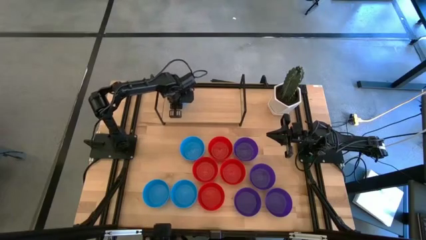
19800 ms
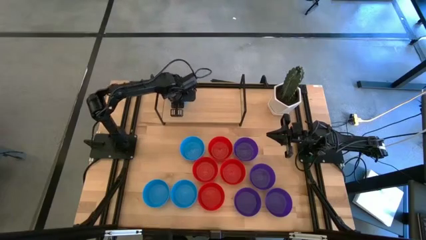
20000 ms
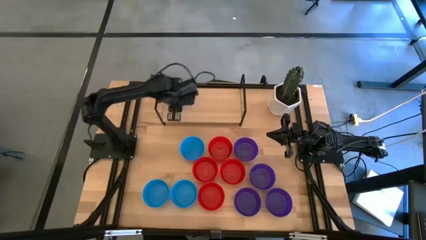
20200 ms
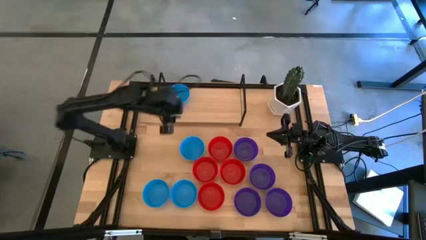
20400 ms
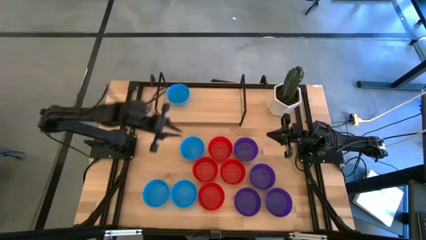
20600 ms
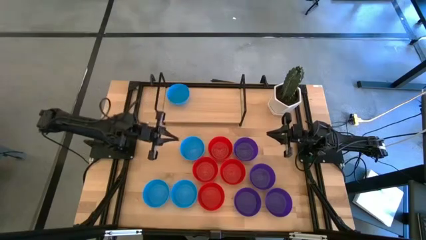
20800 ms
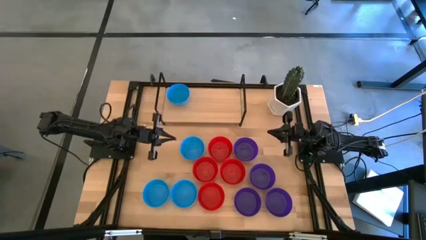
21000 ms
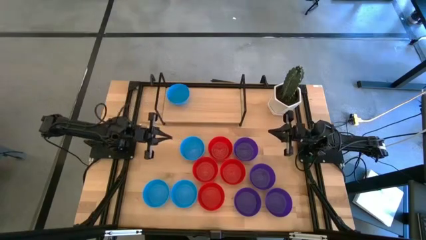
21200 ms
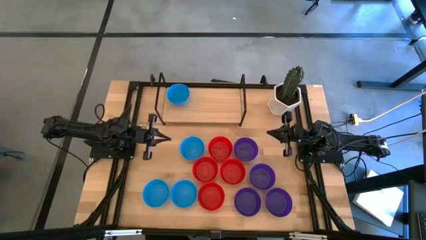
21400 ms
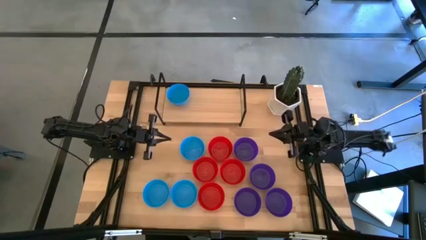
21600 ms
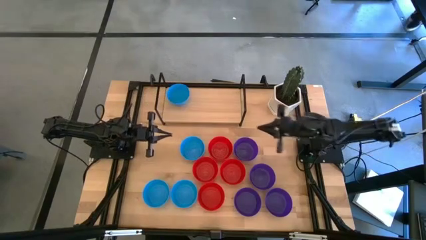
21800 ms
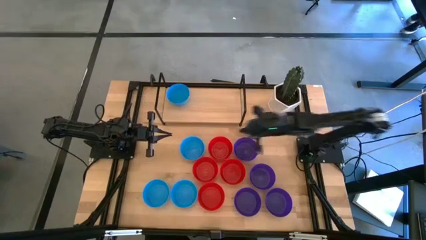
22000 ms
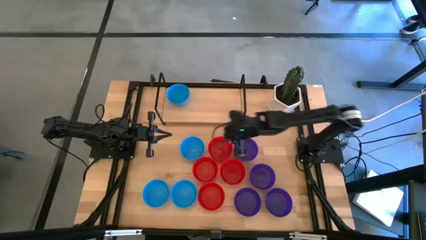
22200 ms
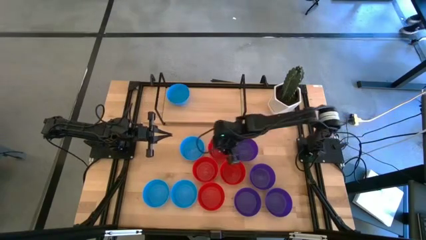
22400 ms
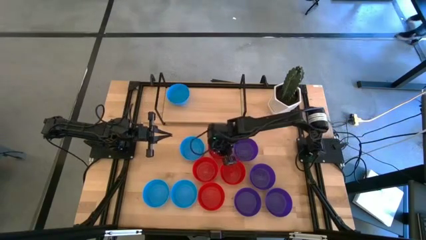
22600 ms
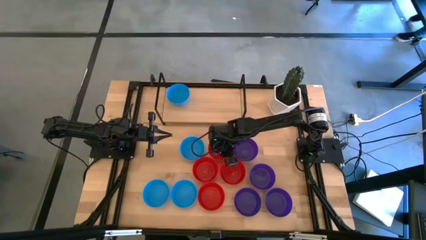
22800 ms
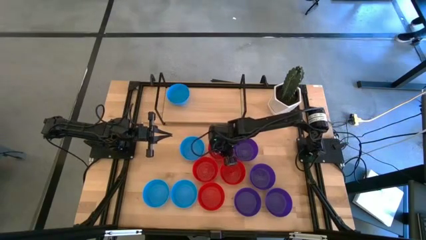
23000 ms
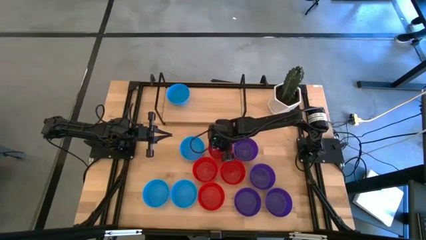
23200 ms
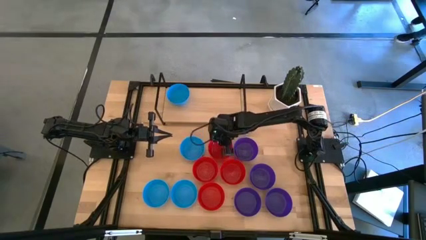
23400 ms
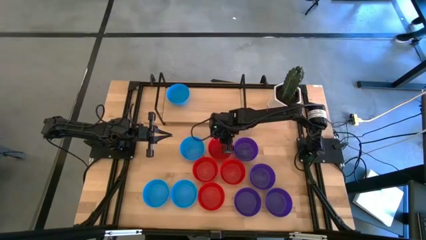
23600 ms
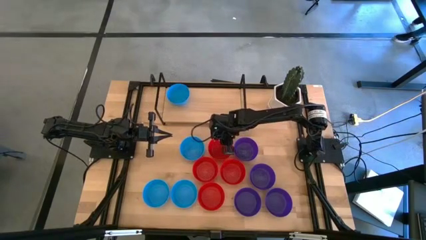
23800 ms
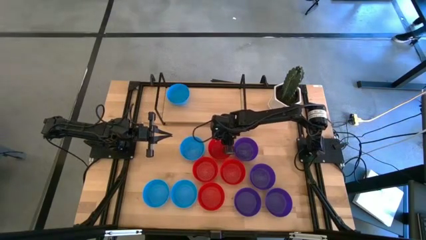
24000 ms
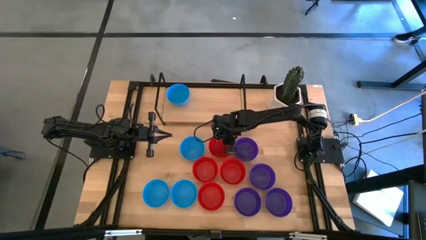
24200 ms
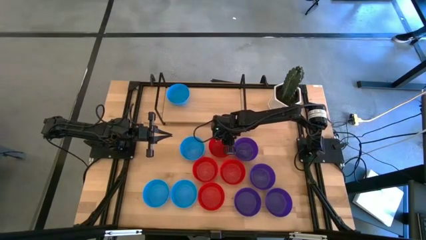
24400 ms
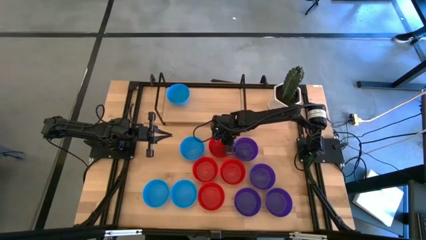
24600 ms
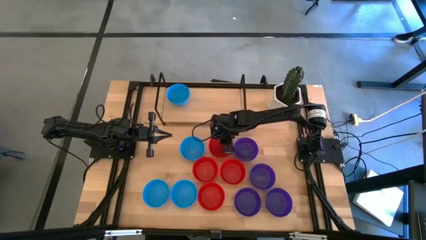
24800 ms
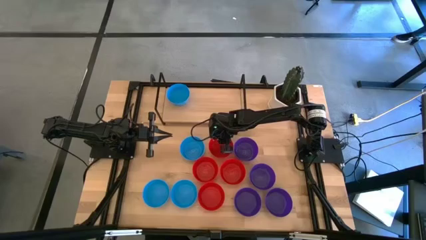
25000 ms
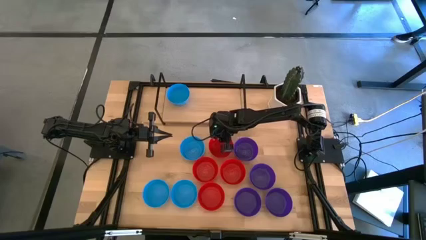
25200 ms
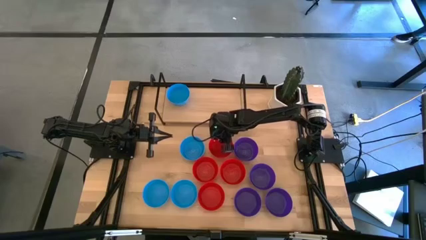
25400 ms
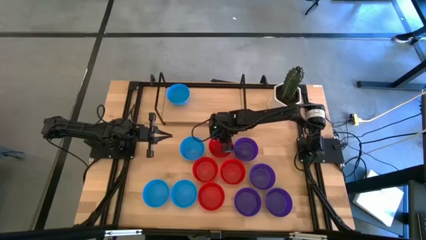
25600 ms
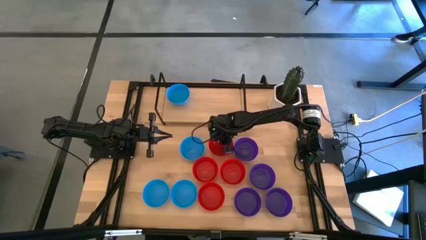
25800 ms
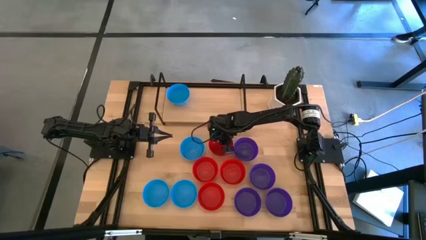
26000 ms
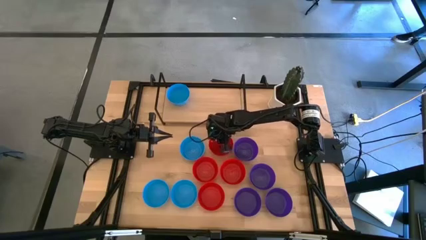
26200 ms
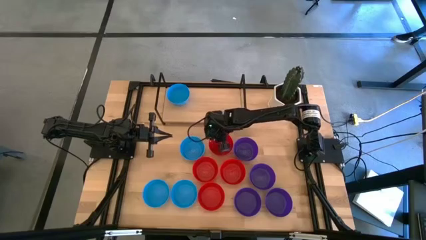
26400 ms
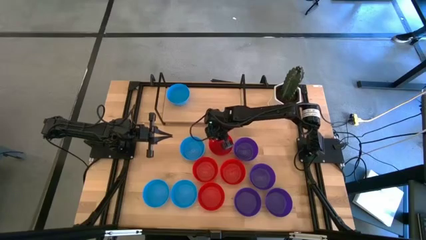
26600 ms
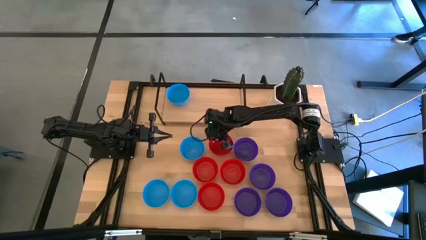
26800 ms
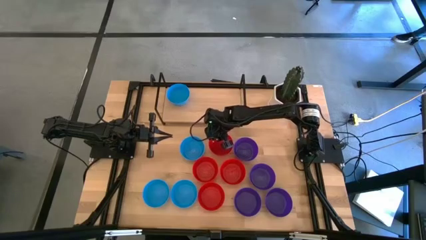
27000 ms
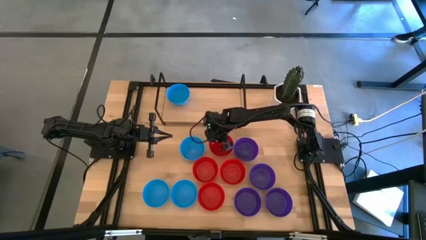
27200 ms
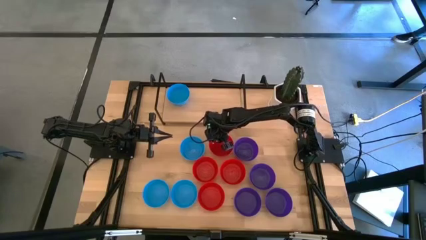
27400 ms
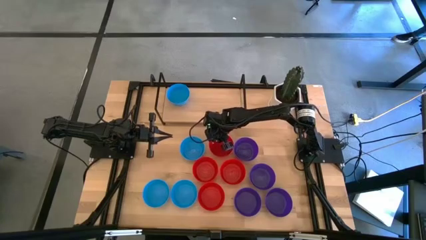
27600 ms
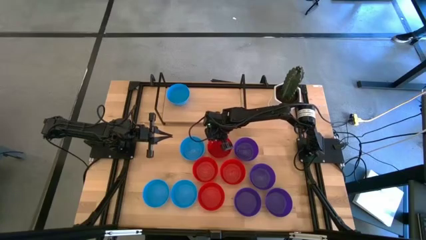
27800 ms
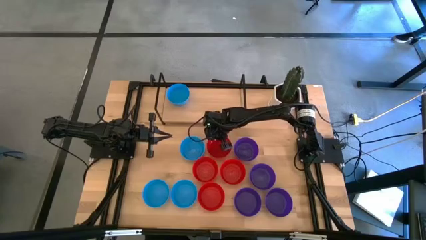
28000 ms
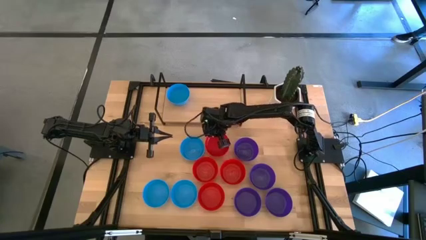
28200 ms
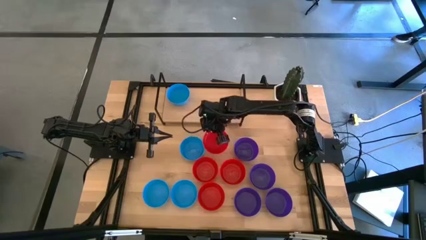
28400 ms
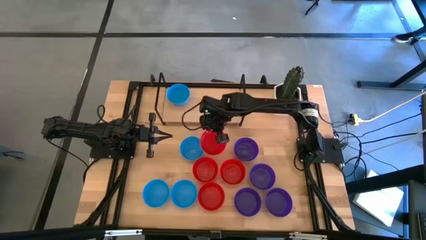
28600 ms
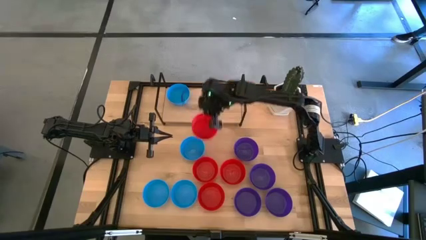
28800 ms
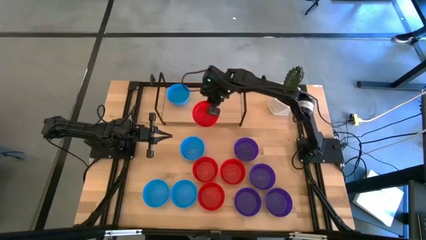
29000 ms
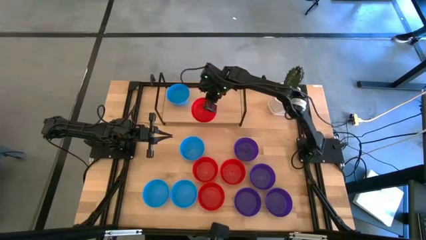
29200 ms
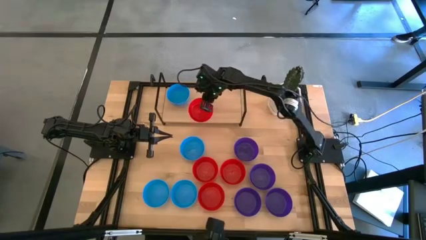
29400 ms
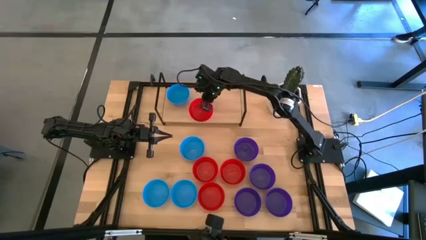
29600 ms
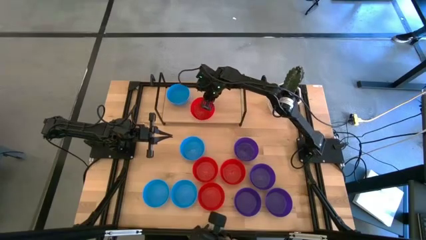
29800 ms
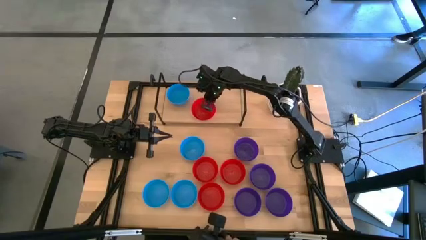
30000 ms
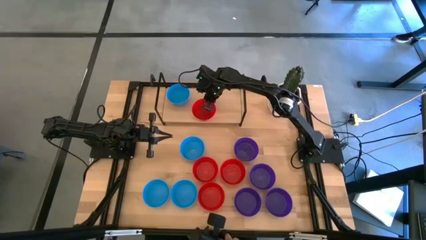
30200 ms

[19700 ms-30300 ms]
Task: Pick & Place Mini bowls
Put the red bowl on the shelf

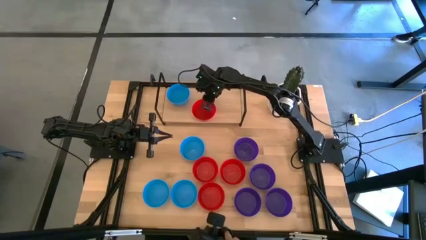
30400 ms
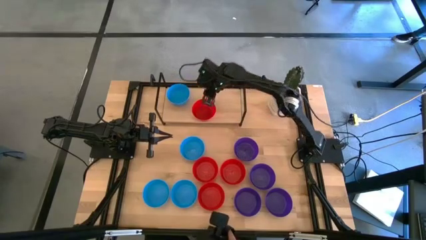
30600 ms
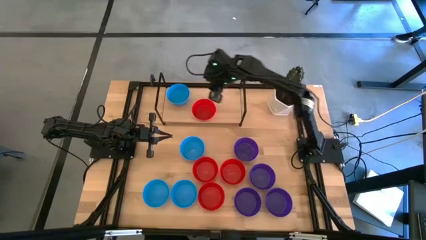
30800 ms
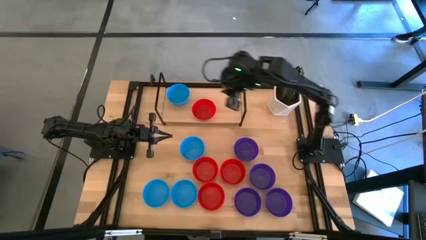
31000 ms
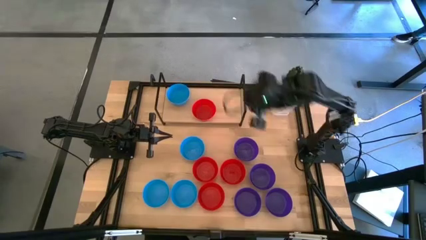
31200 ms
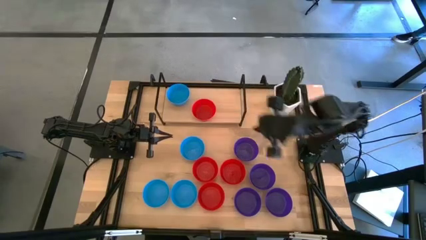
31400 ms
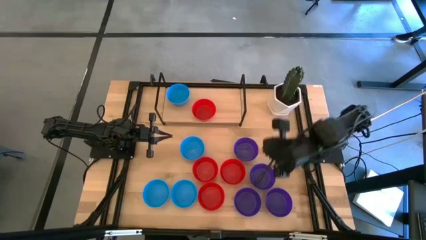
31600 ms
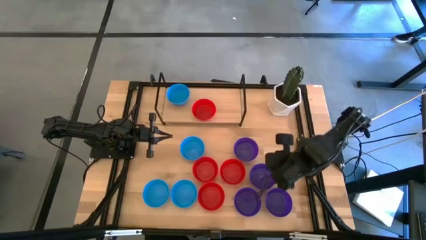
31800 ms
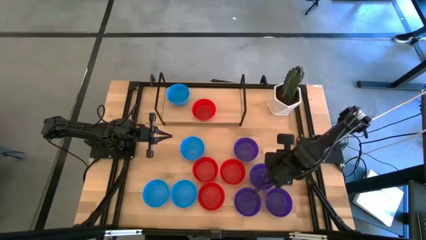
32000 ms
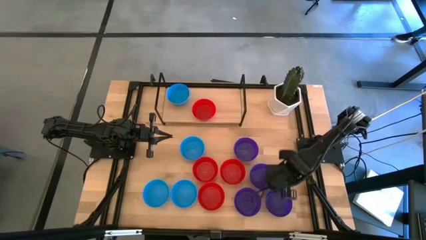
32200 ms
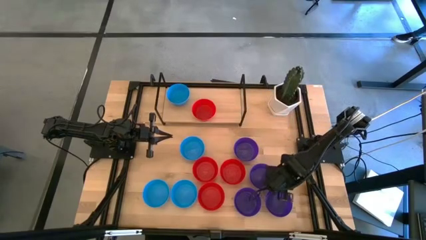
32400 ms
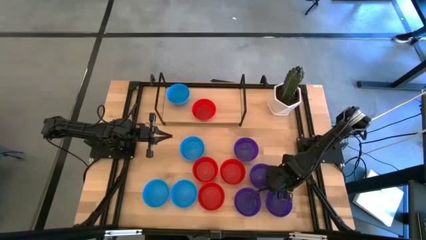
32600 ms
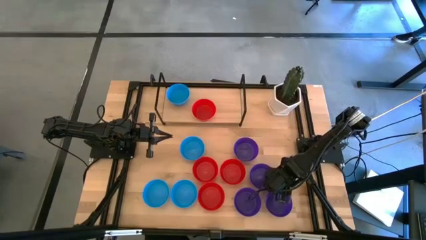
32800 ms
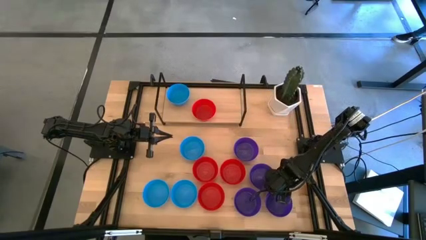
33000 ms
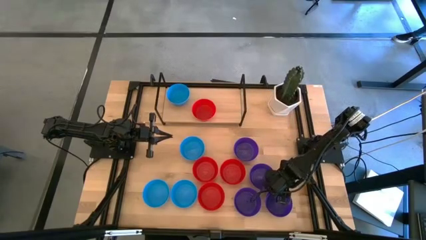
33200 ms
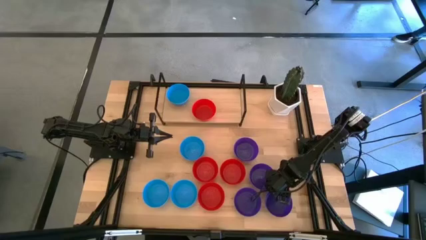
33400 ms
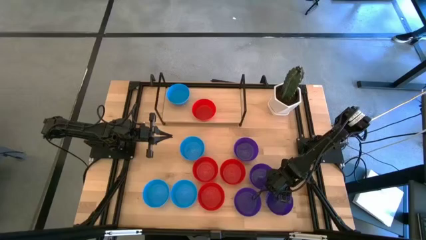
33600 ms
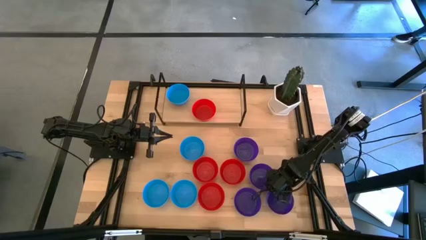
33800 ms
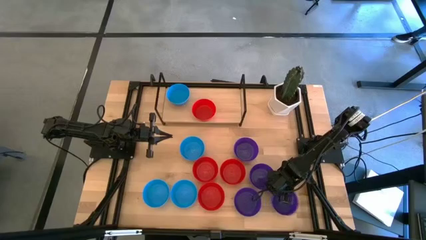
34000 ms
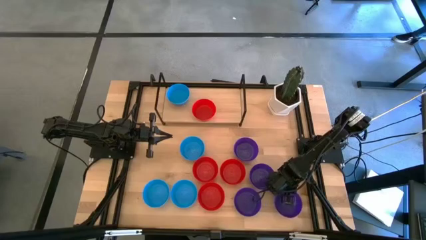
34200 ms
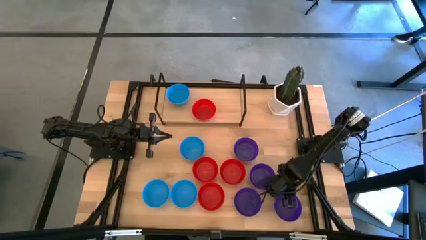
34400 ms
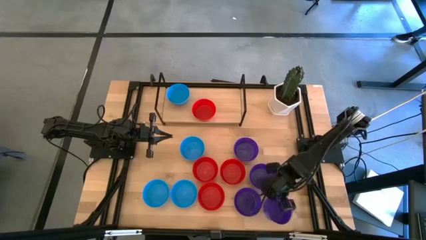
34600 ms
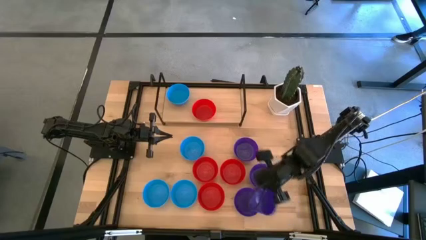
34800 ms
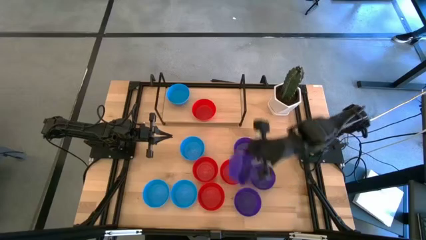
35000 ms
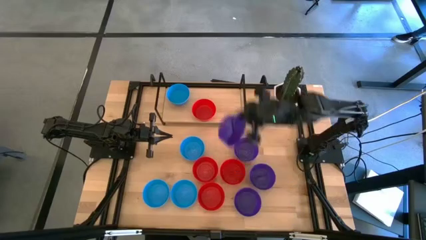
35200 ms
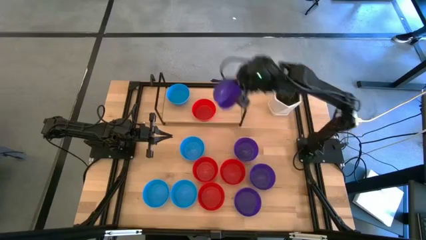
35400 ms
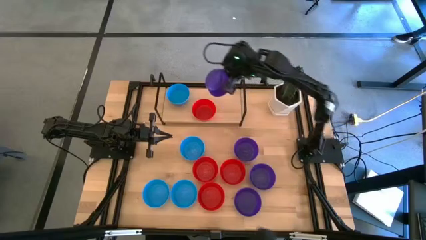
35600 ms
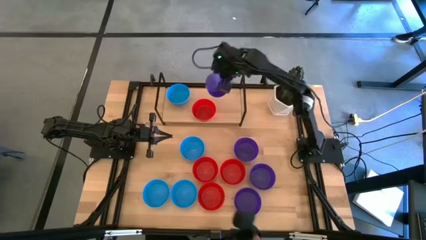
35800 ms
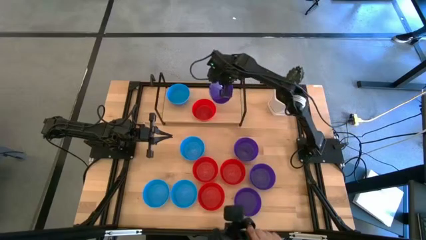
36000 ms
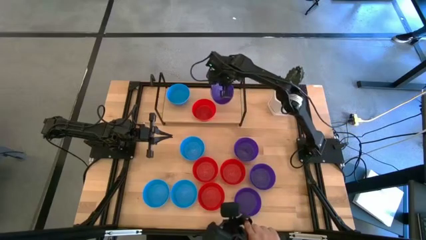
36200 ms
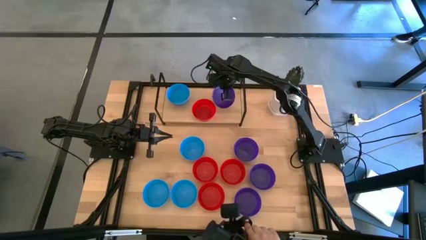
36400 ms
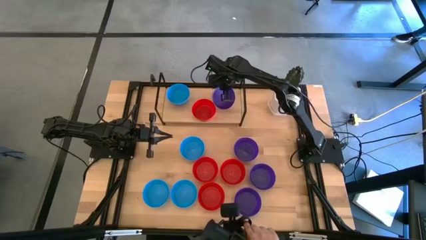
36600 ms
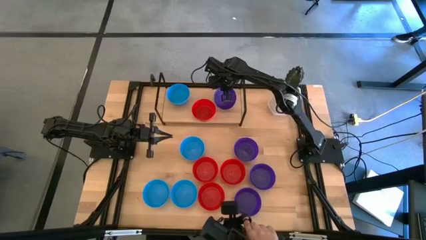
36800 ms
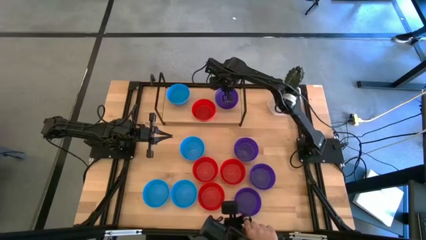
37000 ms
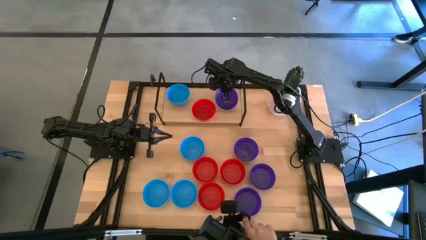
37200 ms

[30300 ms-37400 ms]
Put the violet bowl on the shelf
